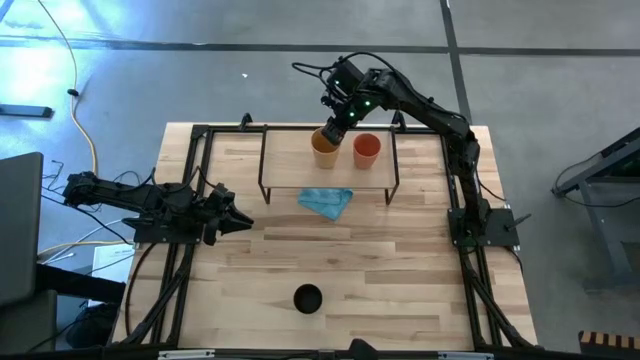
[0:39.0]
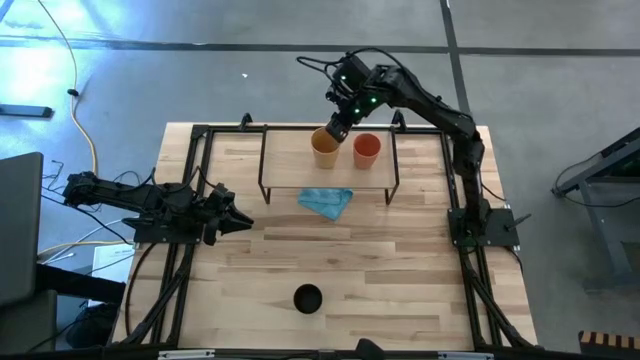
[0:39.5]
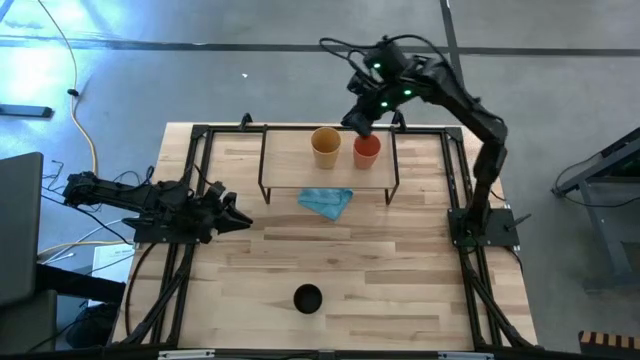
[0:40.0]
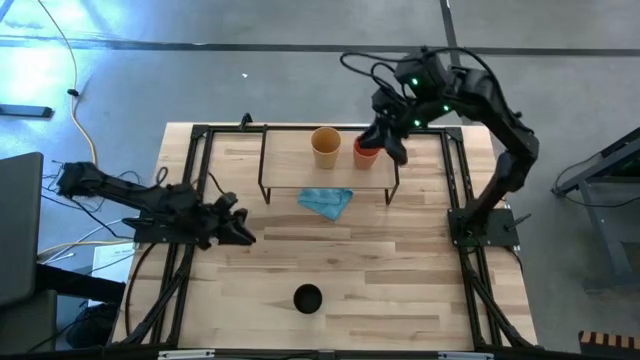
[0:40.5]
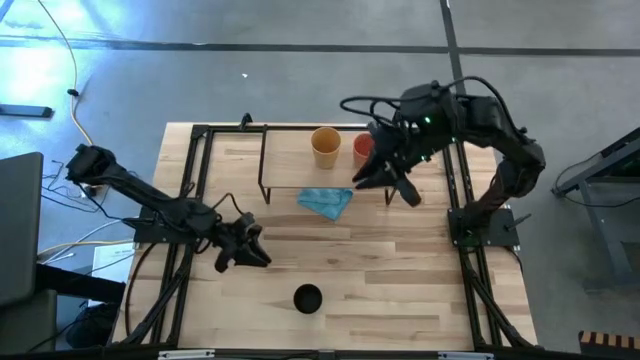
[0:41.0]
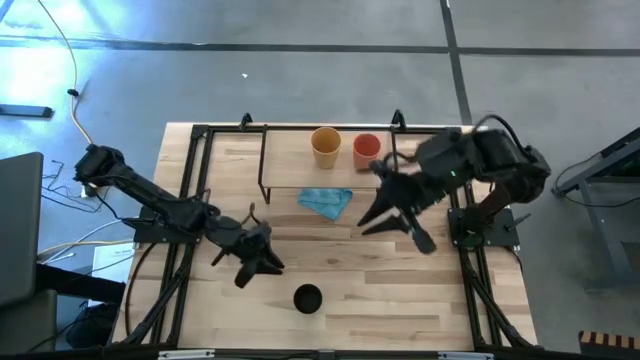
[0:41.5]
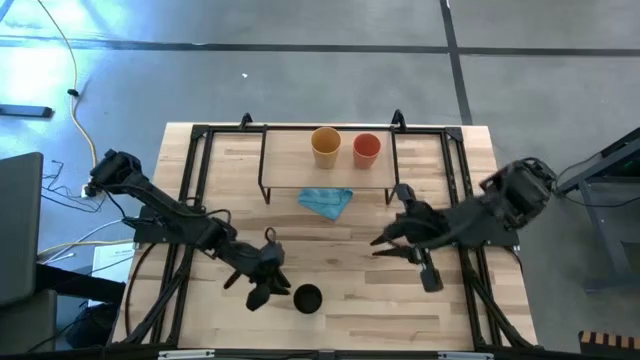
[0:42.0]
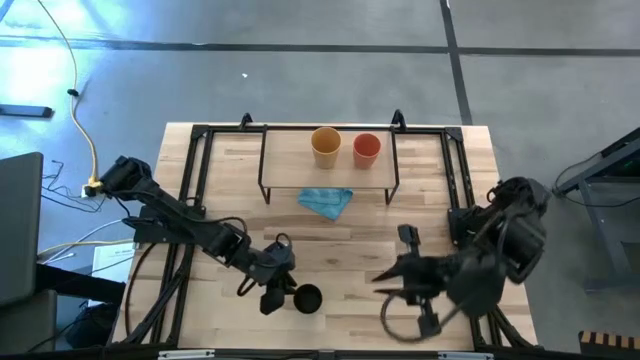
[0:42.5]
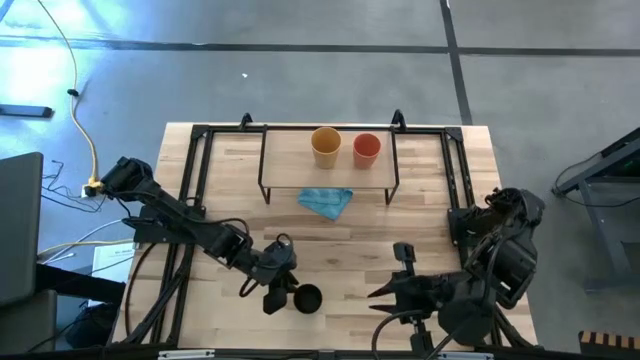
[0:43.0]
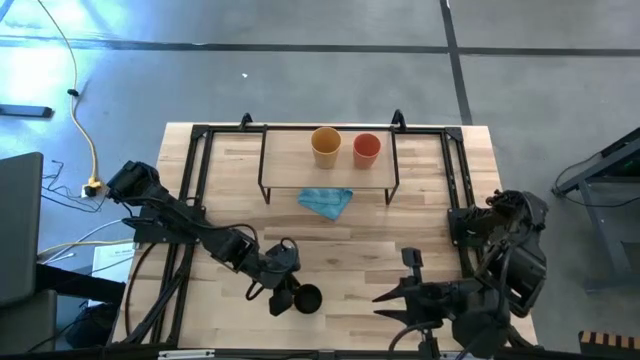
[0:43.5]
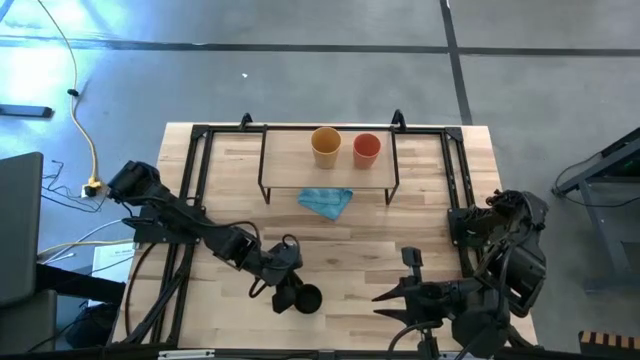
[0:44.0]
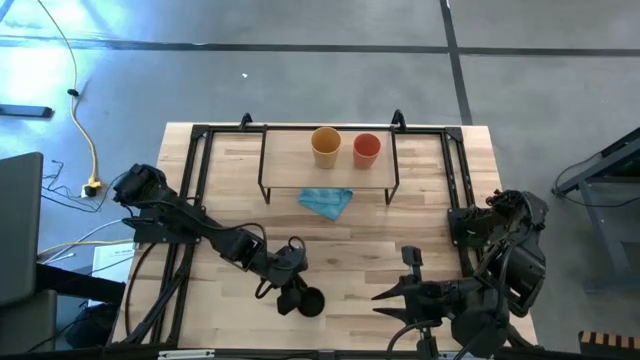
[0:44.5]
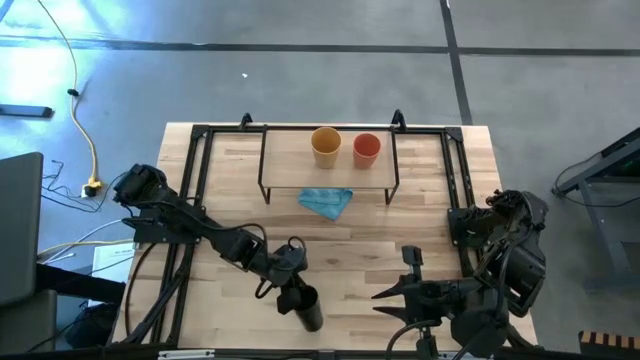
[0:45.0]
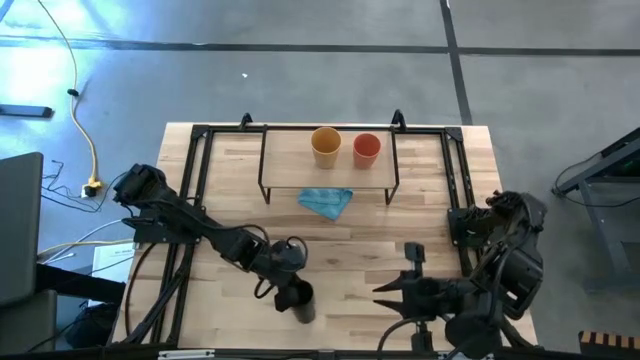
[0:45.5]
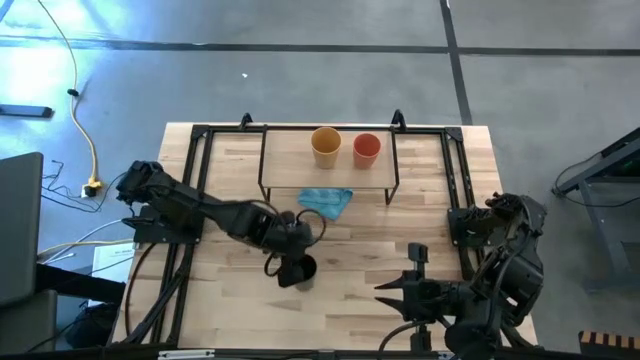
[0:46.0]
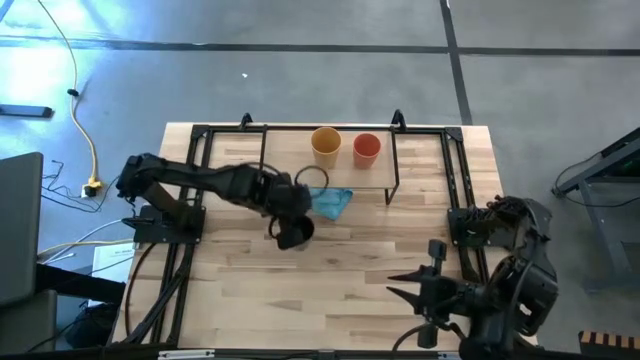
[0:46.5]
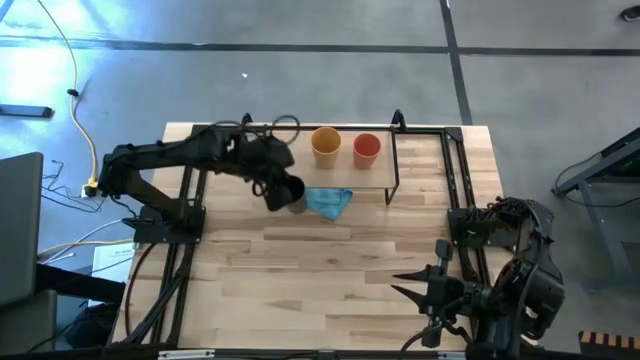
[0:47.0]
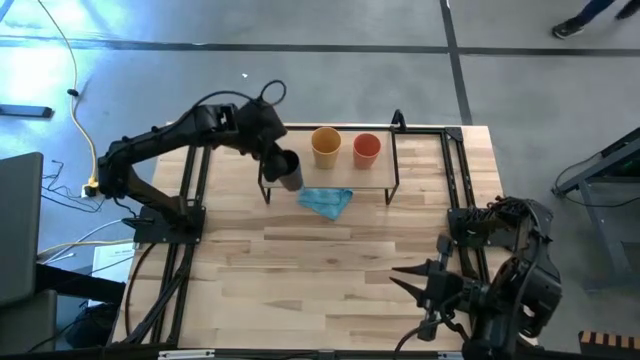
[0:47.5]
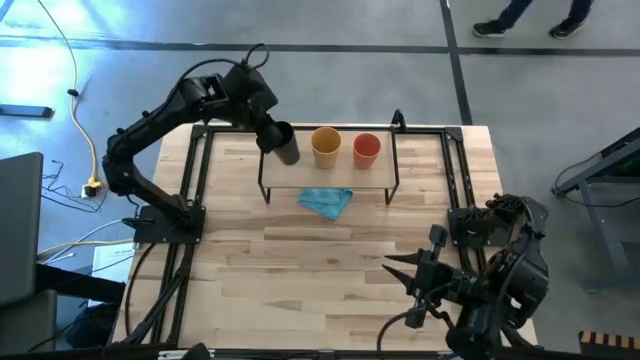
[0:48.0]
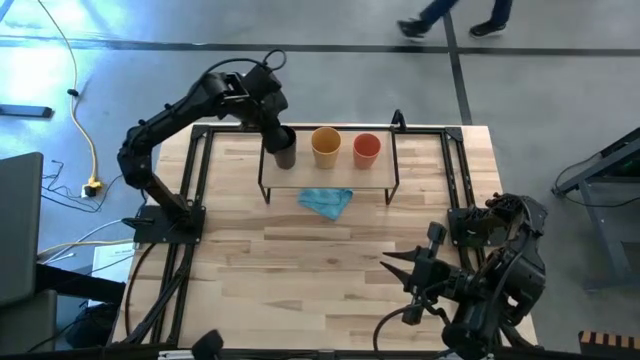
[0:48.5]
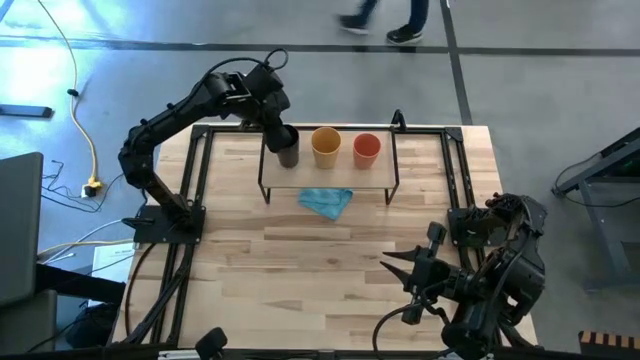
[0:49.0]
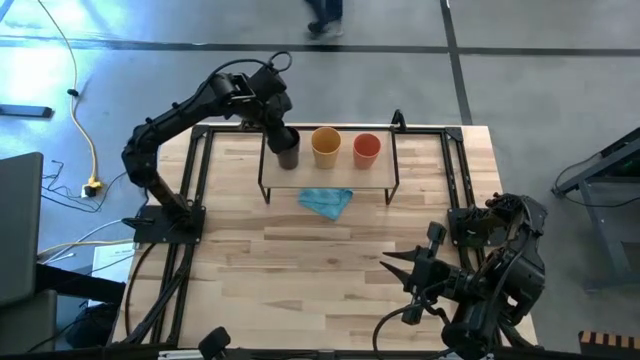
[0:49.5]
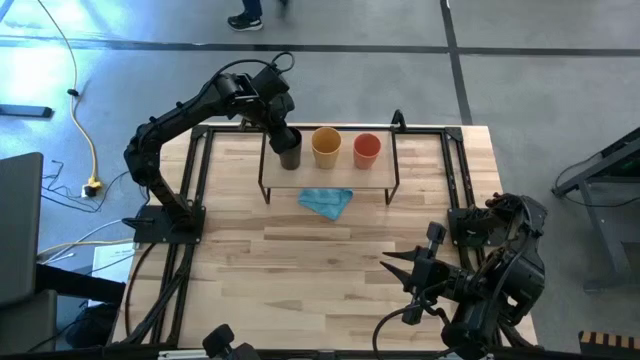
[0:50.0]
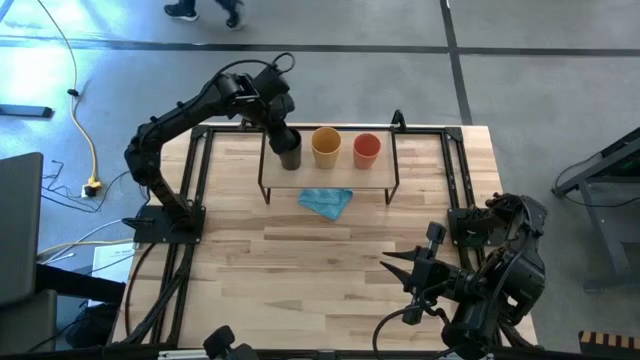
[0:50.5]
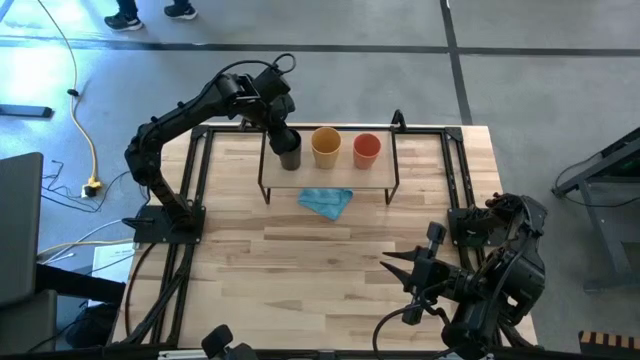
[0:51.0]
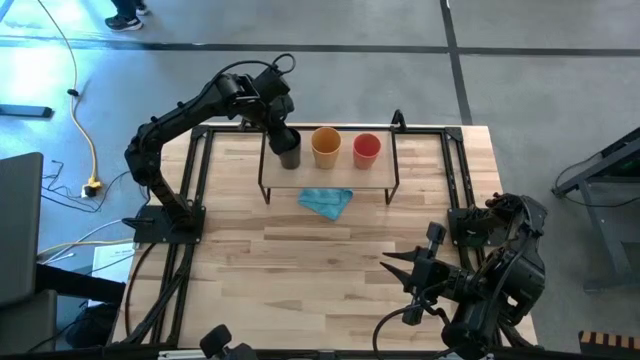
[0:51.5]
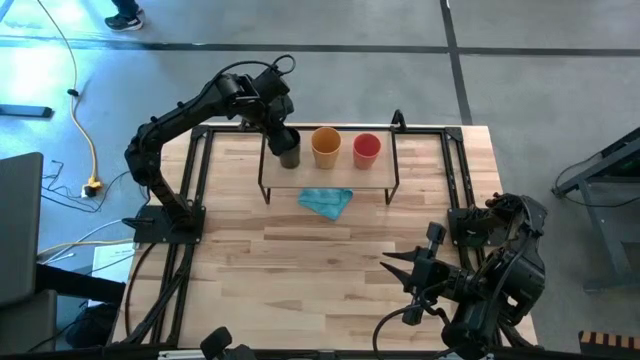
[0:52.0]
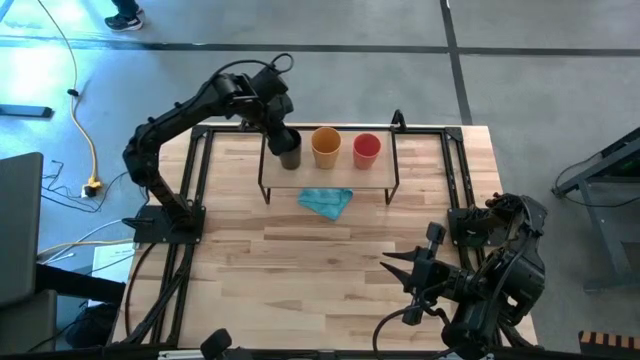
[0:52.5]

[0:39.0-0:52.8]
Task: Stack small to large cups/mugs on shelf
Put the black cup on the shelf
